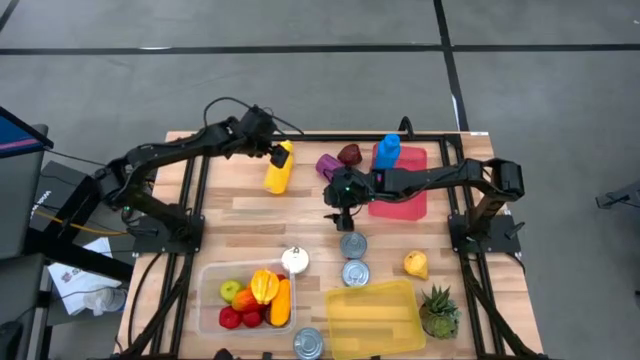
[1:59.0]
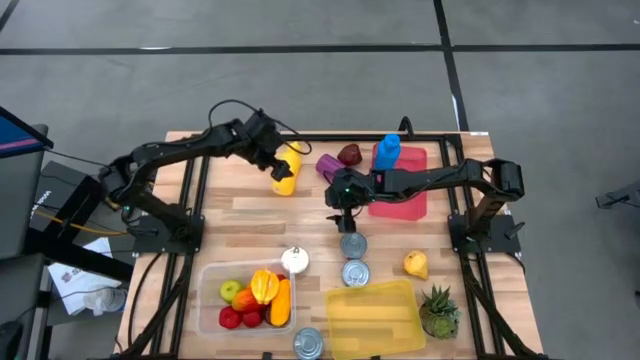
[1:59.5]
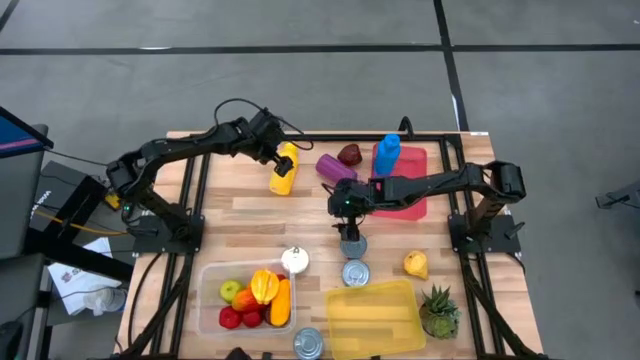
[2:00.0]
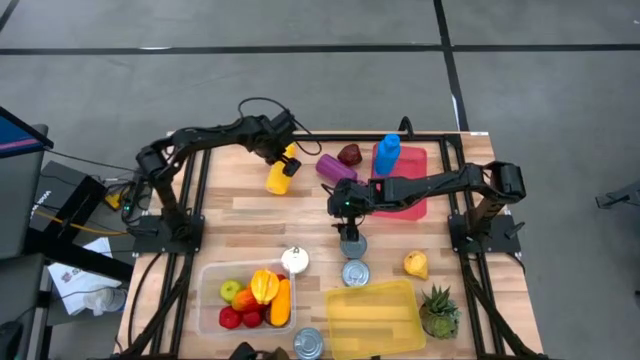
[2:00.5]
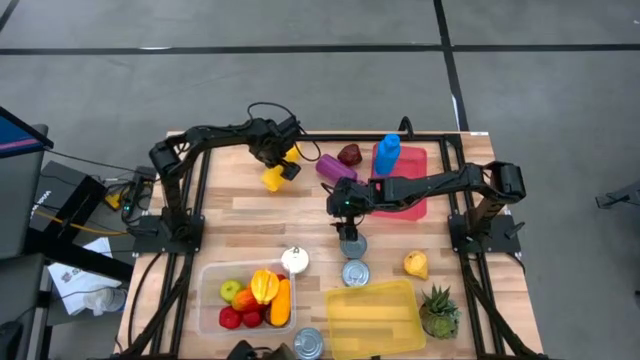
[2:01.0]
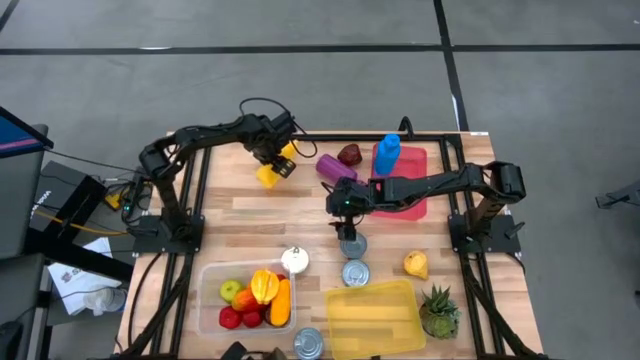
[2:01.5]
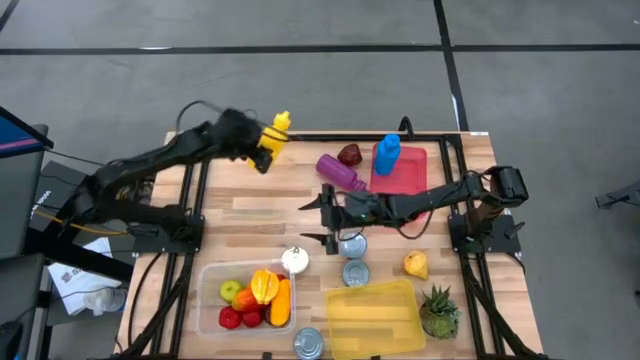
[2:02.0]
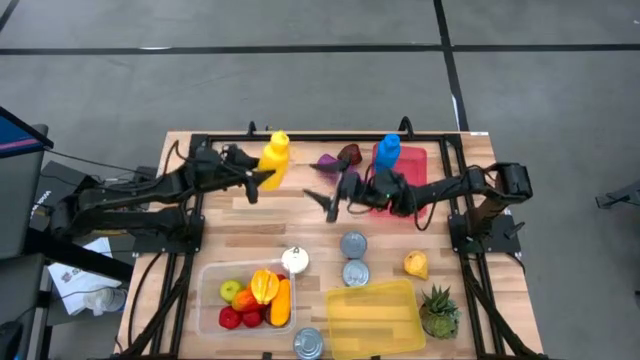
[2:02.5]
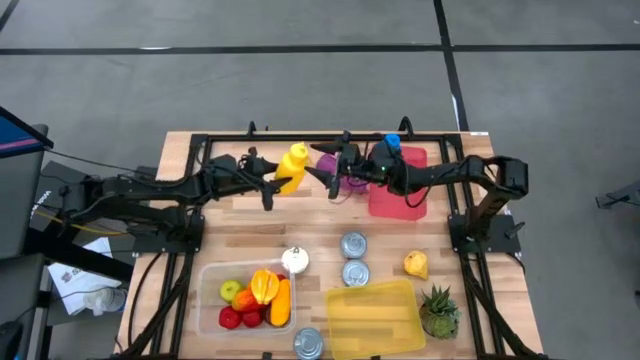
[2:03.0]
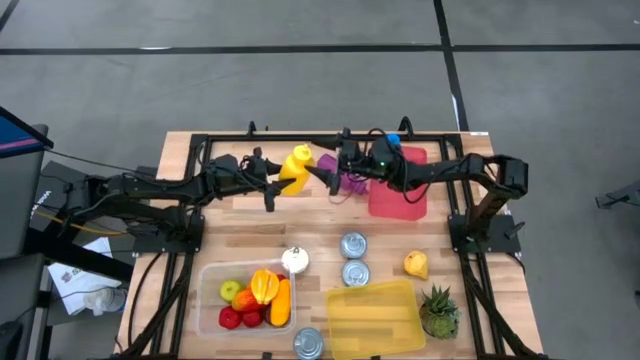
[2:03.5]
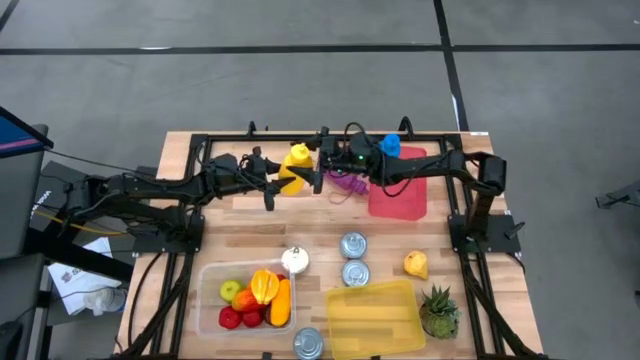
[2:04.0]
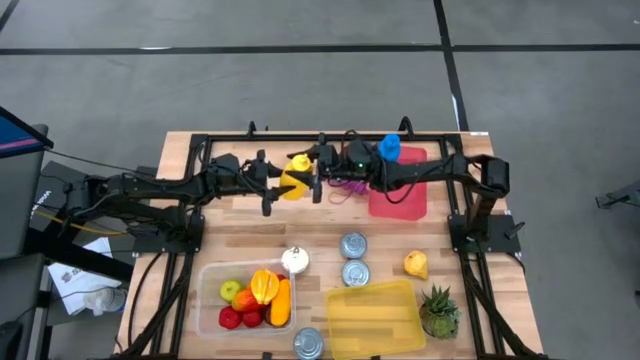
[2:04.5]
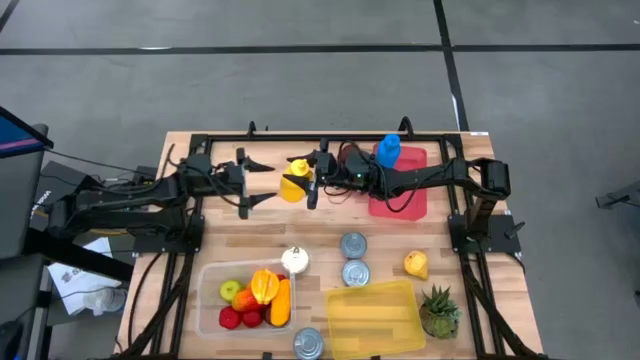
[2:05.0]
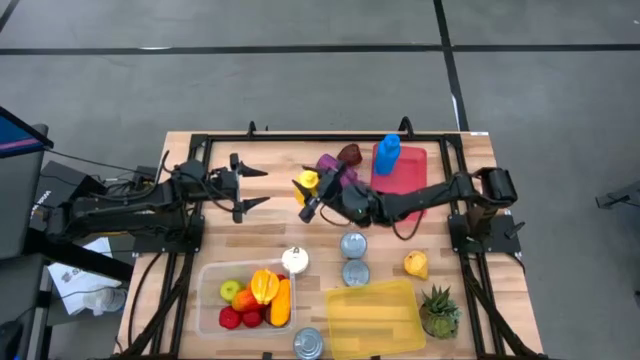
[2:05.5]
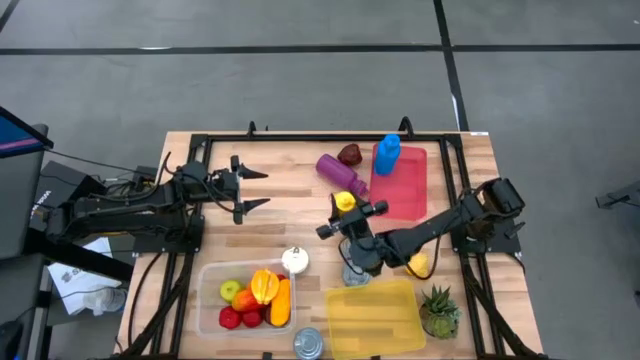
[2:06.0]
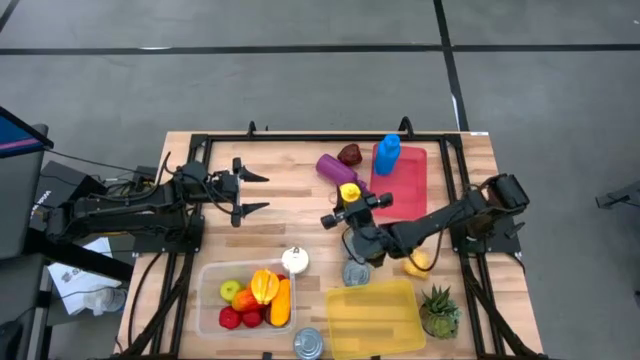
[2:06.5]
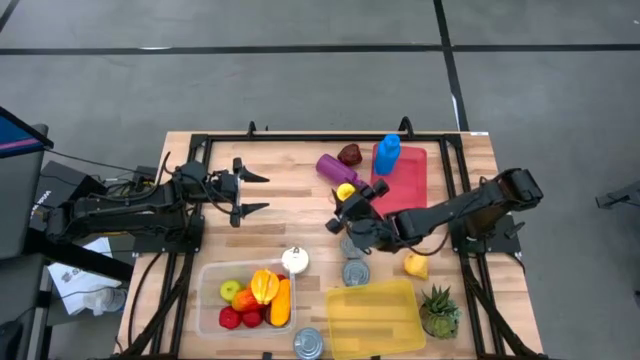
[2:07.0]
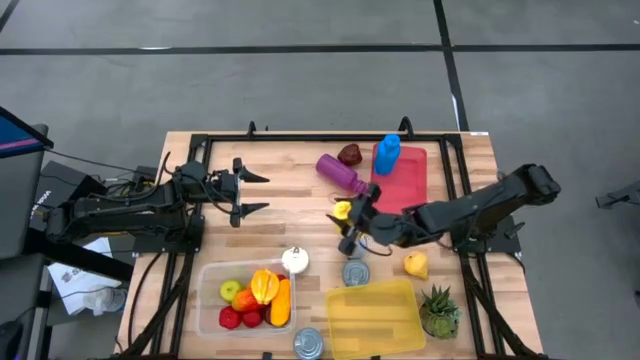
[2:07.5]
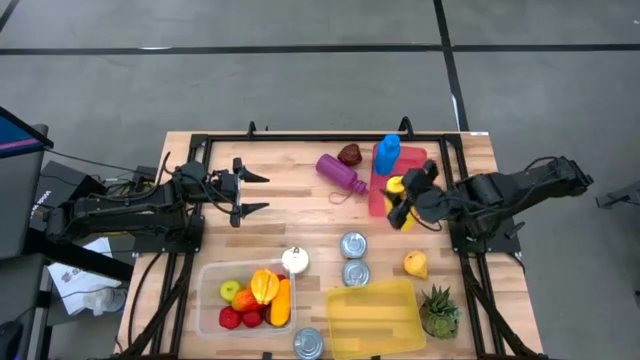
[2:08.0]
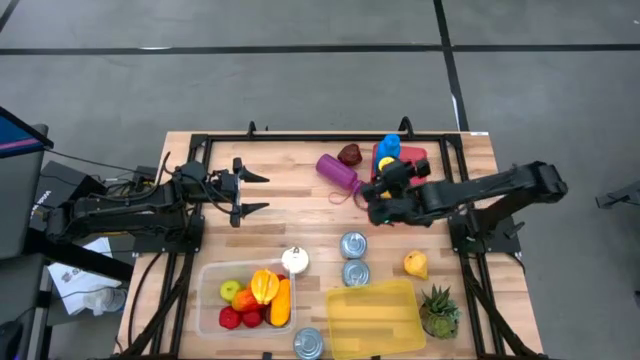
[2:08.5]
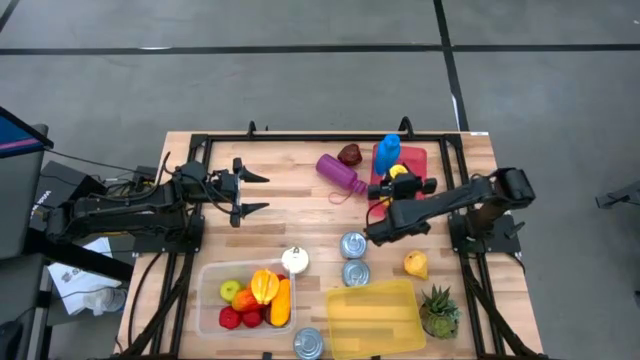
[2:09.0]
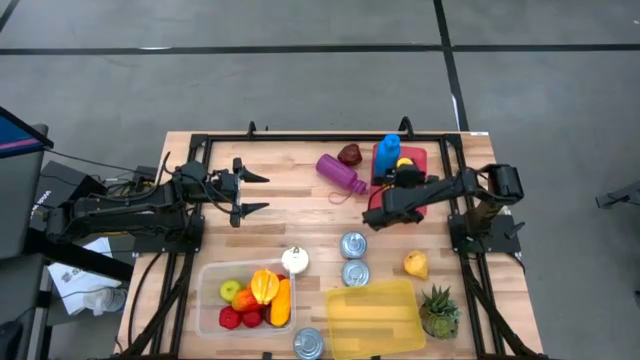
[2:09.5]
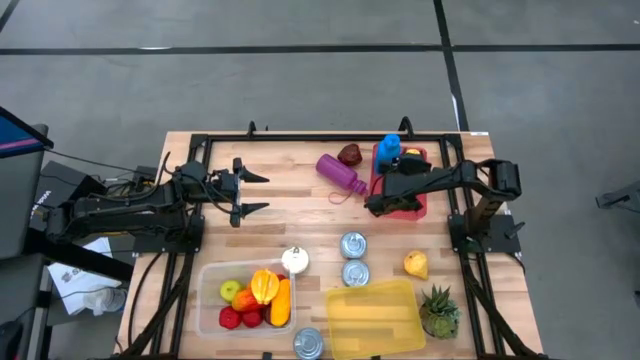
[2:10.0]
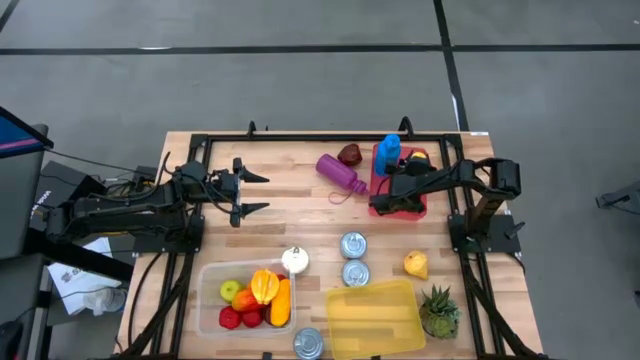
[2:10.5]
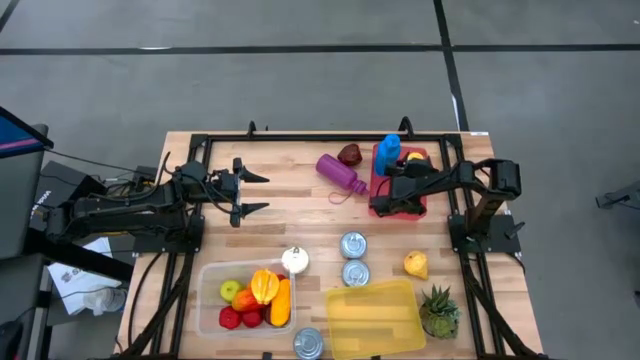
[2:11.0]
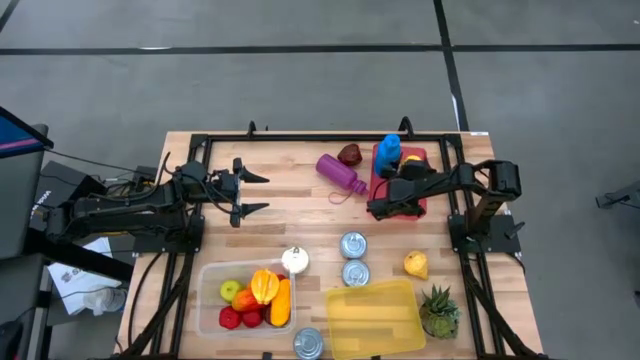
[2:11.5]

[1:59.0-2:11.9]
Task: Pick & Place Food Item
Put the yellow water bottle into the red bin

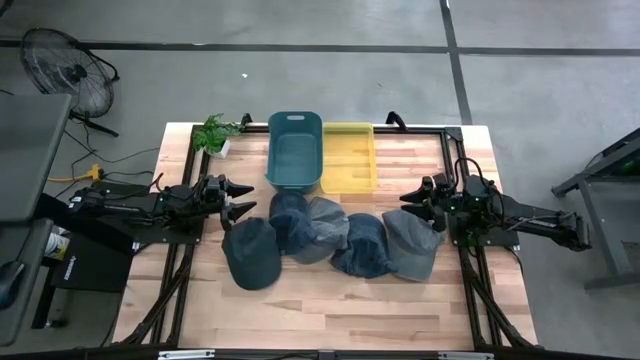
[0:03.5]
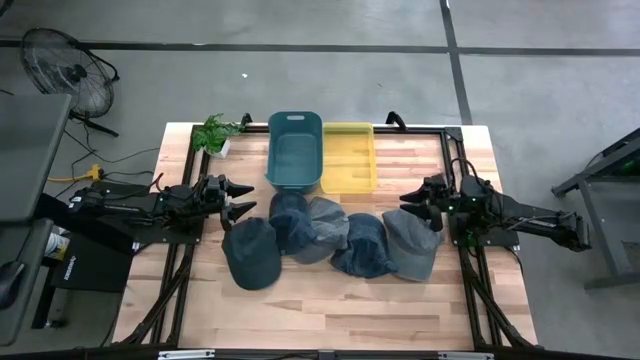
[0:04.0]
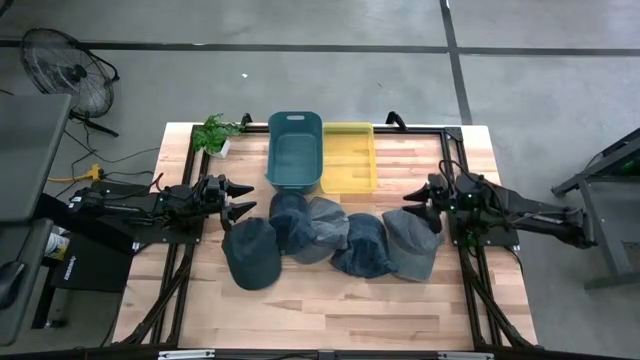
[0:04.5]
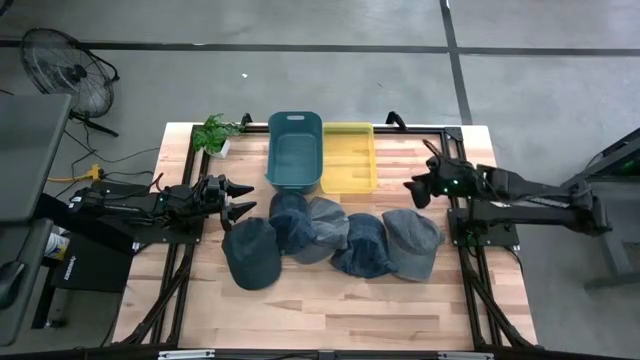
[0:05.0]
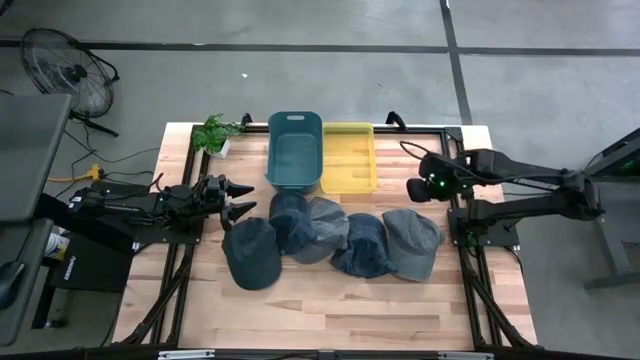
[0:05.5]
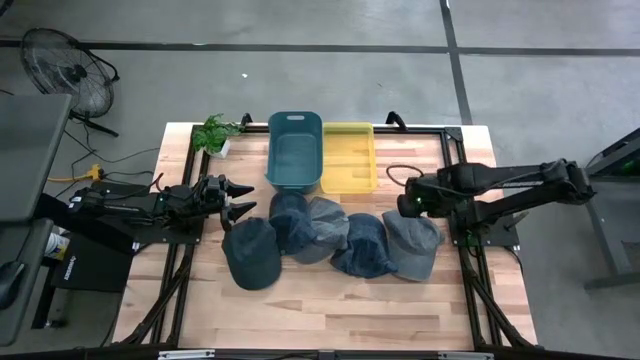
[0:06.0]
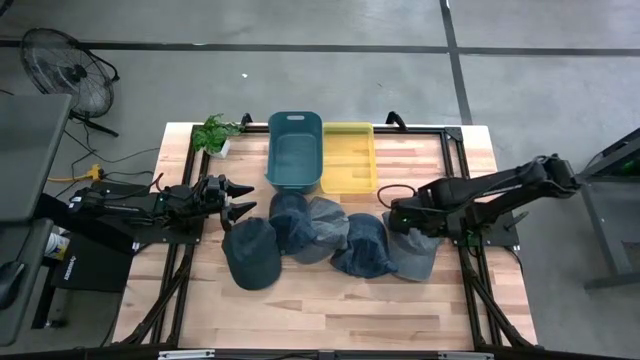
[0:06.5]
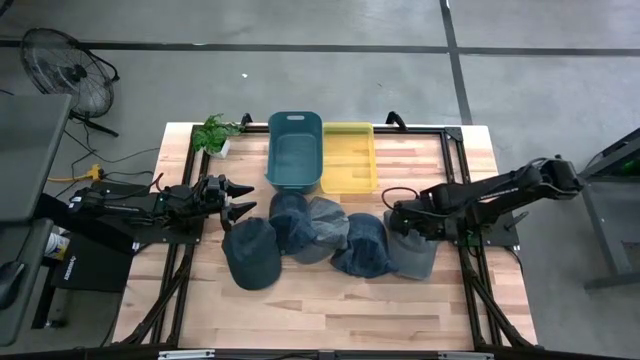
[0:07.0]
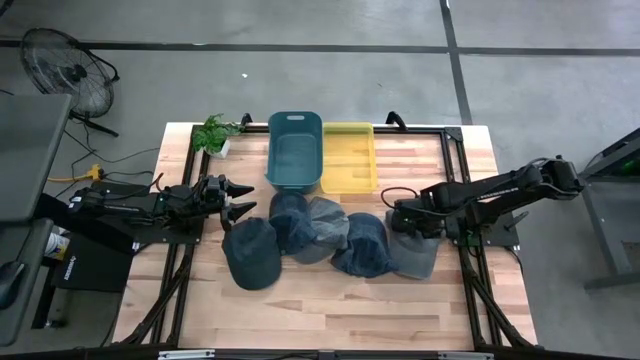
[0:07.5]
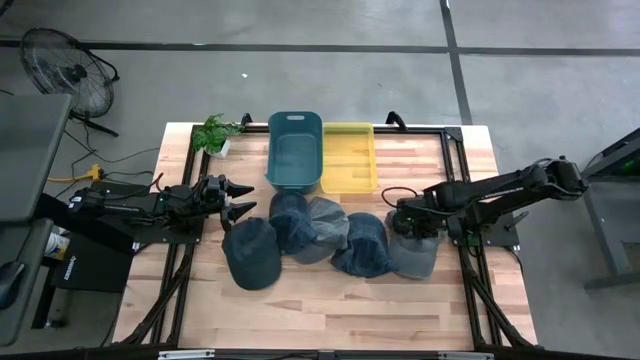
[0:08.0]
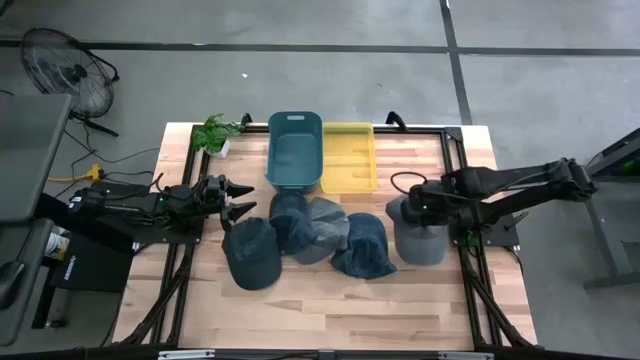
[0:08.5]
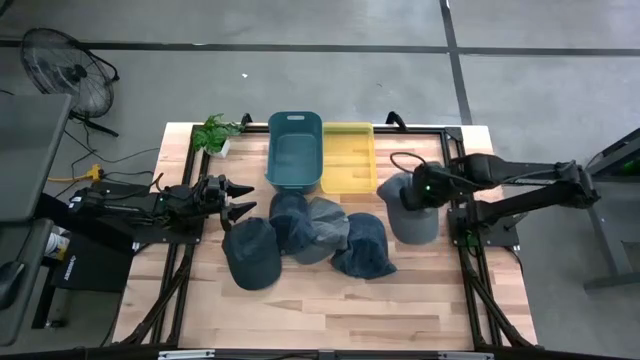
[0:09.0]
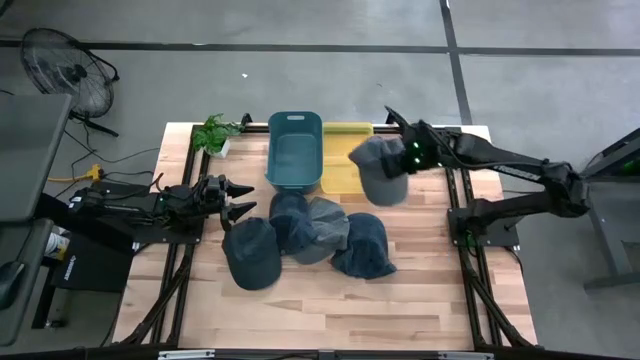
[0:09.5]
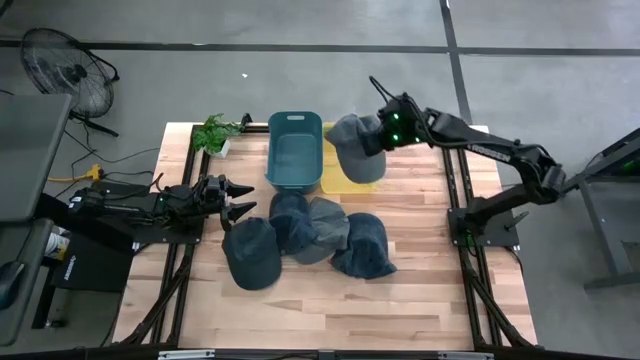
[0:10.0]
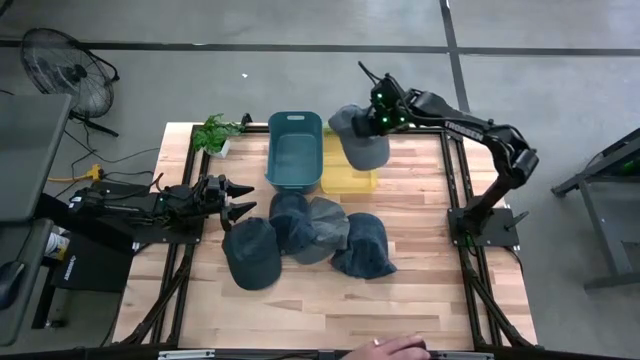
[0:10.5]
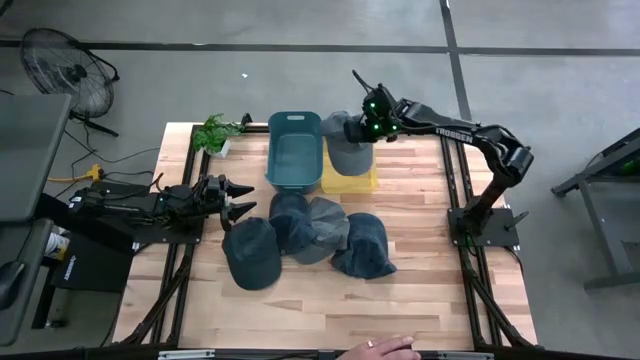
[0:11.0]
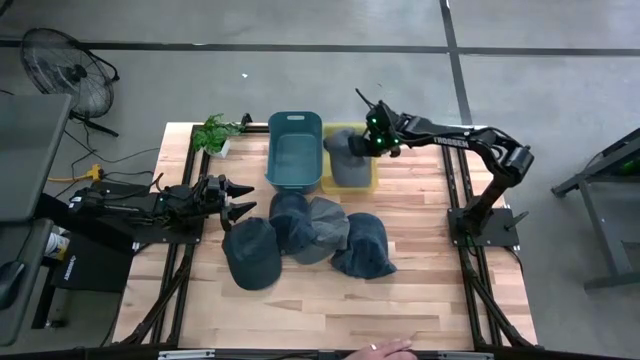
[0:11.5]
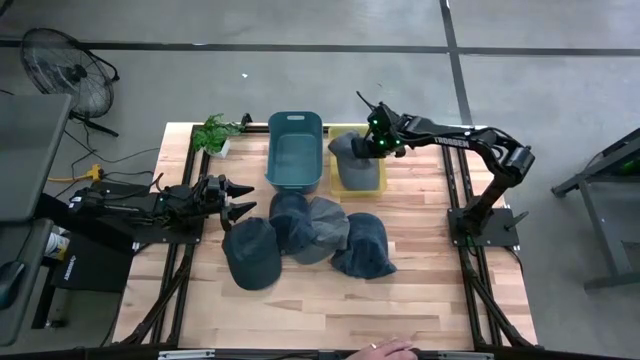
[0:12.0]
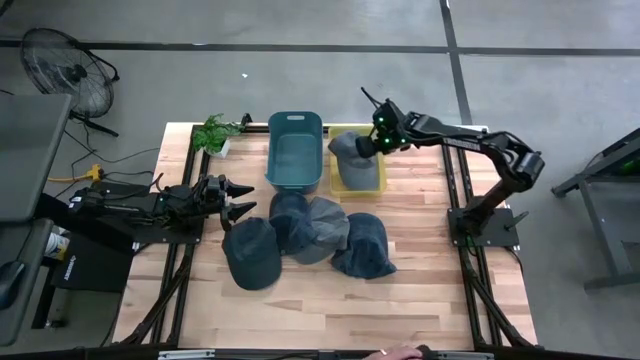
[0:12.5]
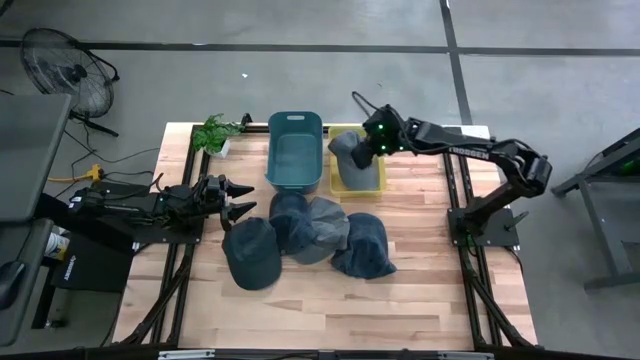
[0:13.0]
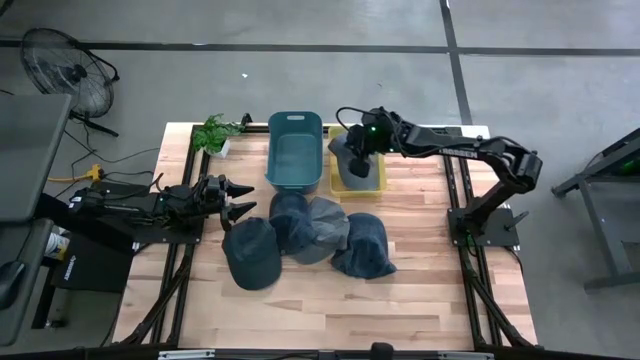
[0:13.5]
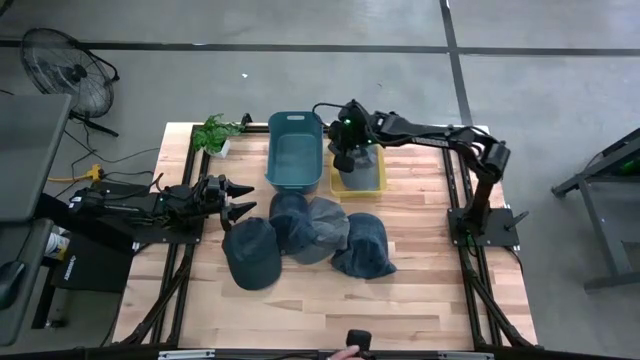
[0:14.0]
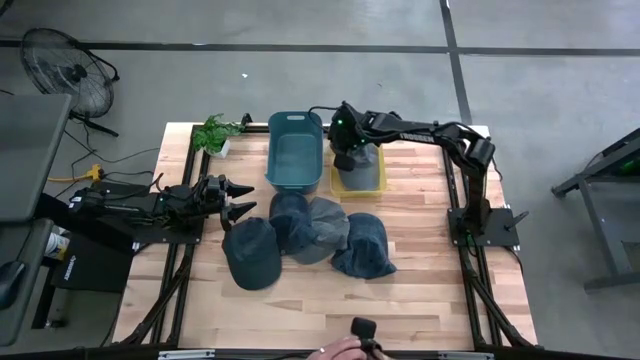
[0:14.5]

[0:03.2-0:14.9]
Task: Pick & Place hat
Put the right gray cap into the yellow bin
